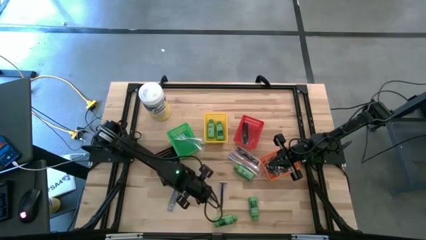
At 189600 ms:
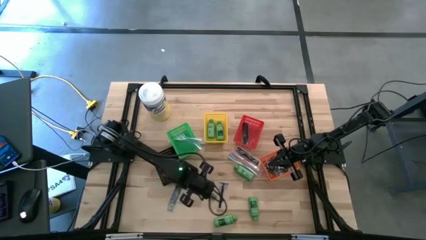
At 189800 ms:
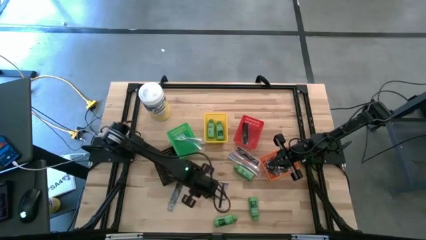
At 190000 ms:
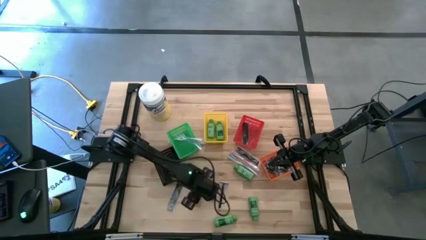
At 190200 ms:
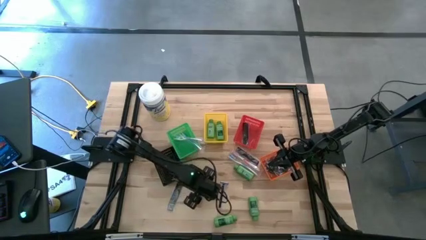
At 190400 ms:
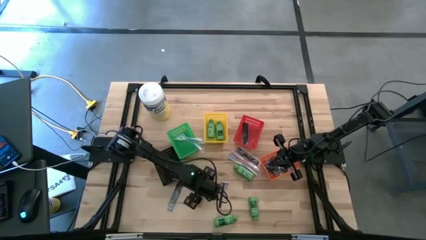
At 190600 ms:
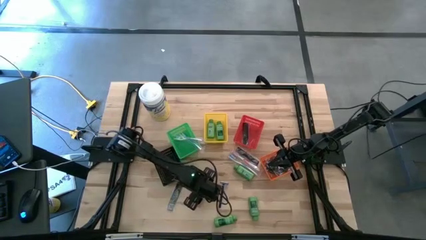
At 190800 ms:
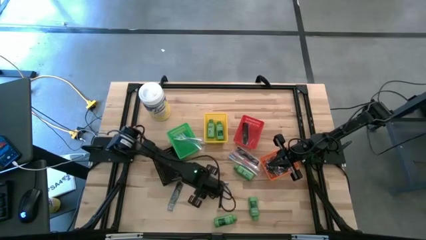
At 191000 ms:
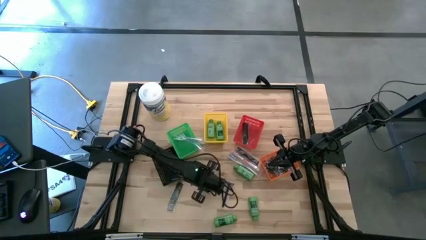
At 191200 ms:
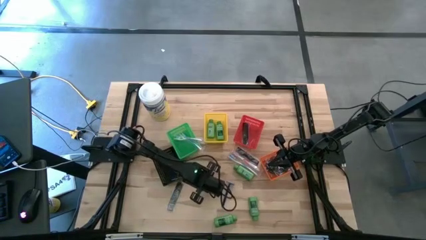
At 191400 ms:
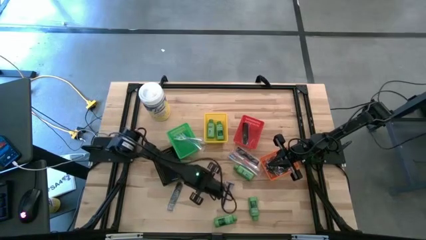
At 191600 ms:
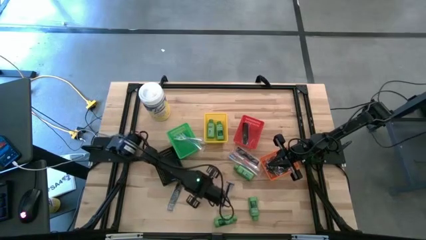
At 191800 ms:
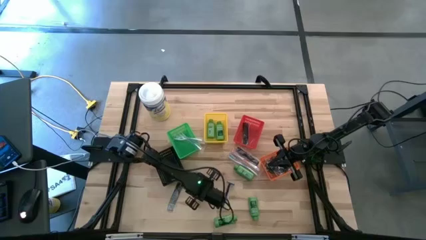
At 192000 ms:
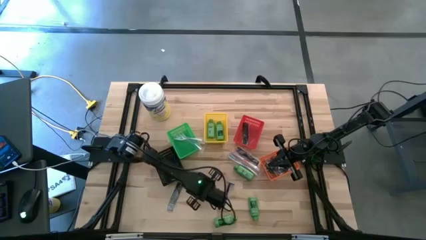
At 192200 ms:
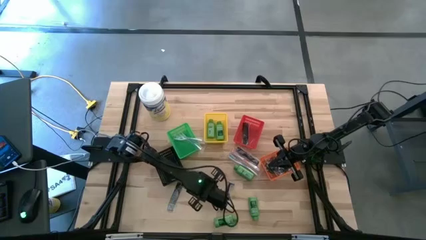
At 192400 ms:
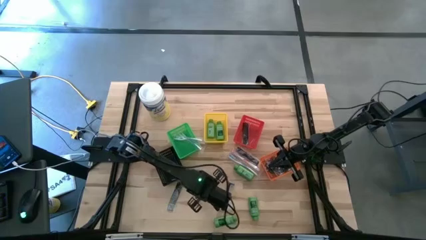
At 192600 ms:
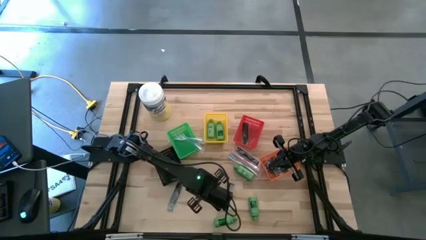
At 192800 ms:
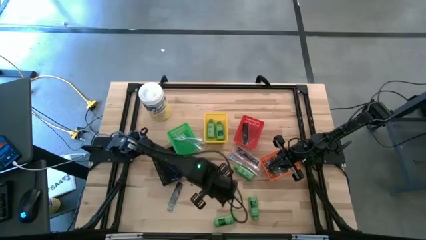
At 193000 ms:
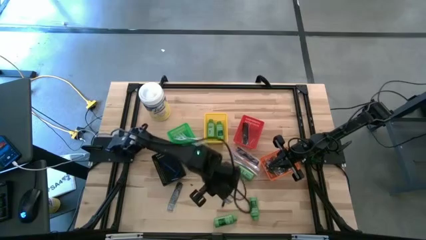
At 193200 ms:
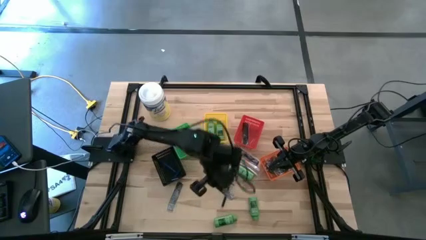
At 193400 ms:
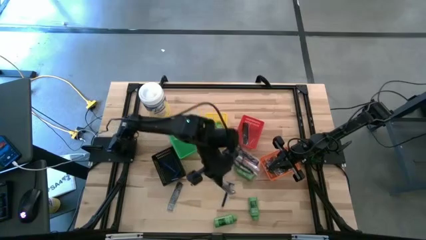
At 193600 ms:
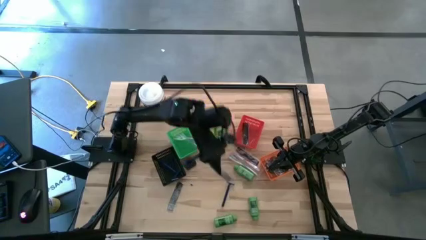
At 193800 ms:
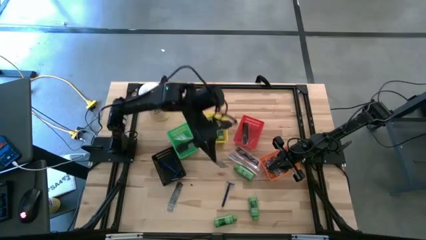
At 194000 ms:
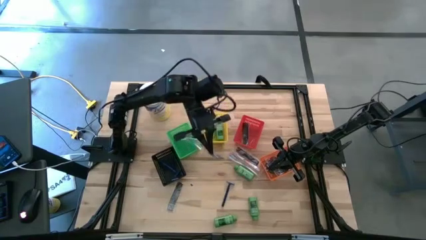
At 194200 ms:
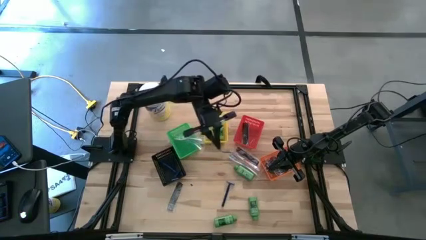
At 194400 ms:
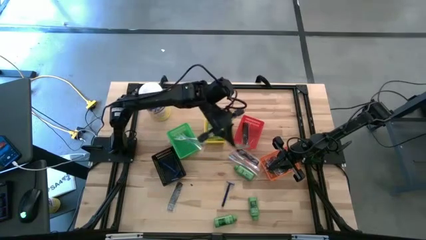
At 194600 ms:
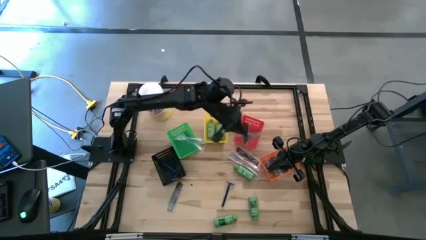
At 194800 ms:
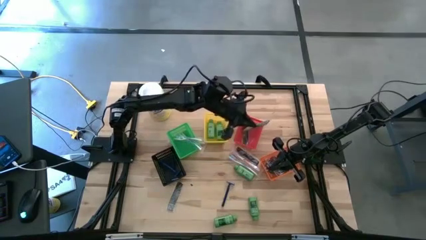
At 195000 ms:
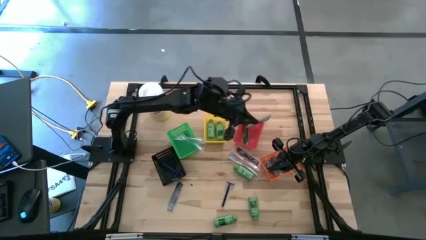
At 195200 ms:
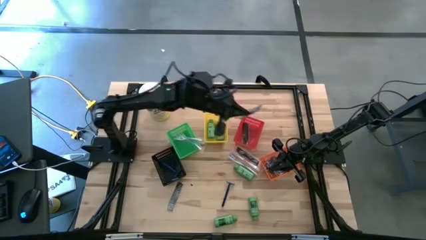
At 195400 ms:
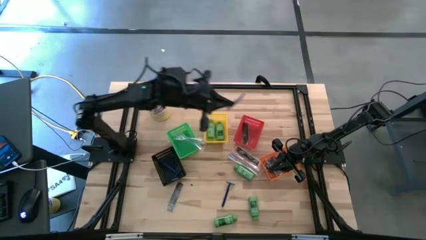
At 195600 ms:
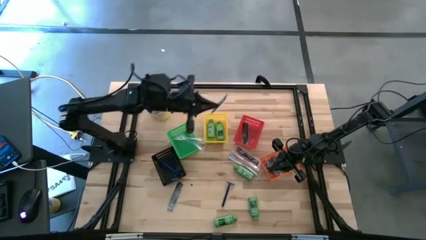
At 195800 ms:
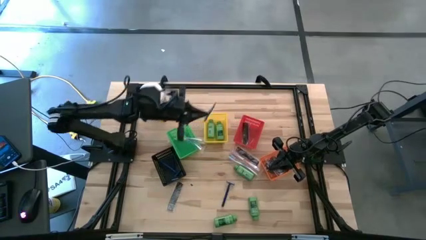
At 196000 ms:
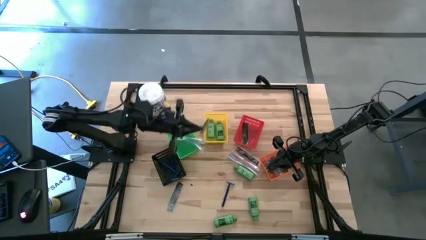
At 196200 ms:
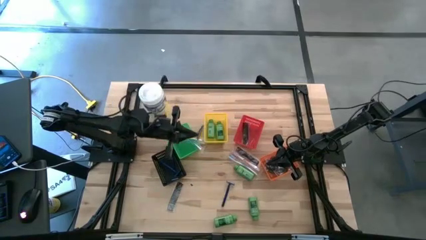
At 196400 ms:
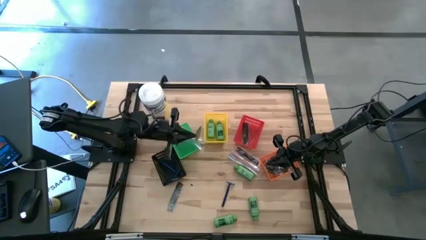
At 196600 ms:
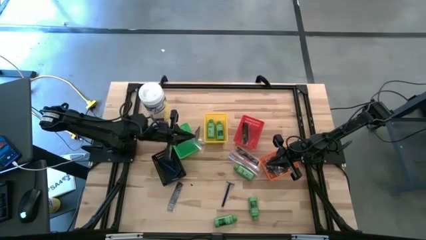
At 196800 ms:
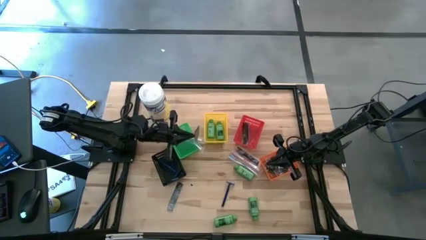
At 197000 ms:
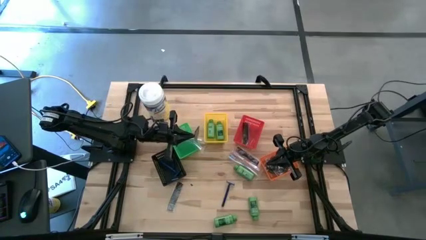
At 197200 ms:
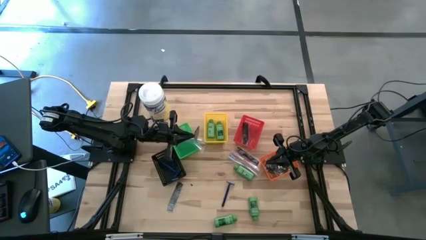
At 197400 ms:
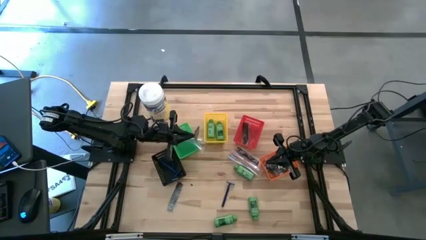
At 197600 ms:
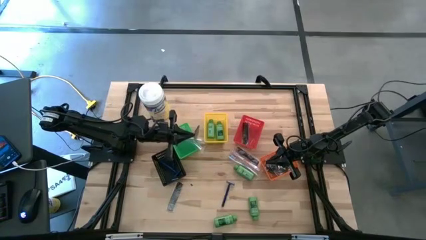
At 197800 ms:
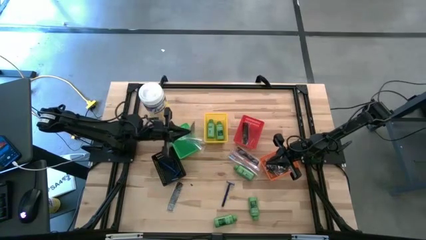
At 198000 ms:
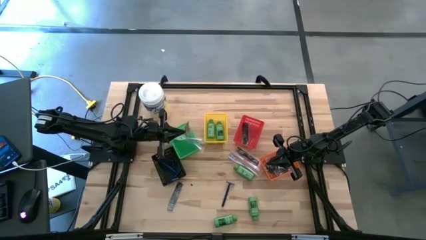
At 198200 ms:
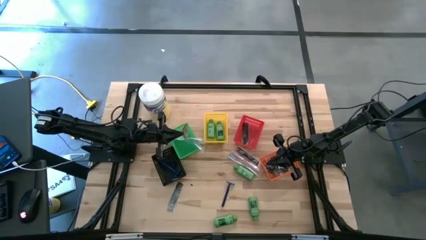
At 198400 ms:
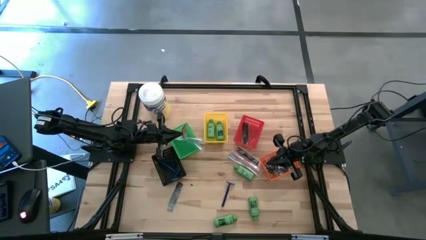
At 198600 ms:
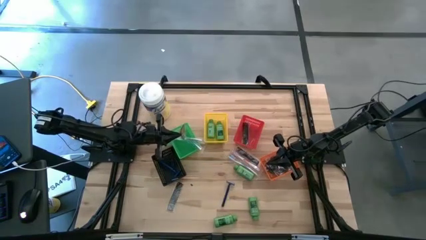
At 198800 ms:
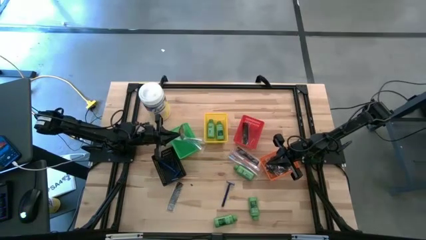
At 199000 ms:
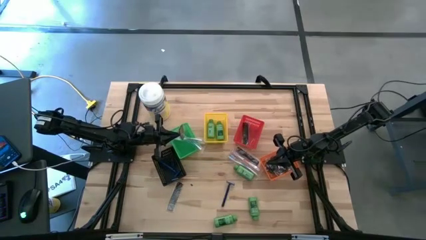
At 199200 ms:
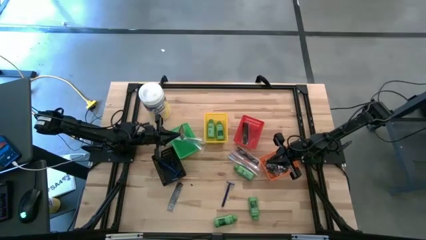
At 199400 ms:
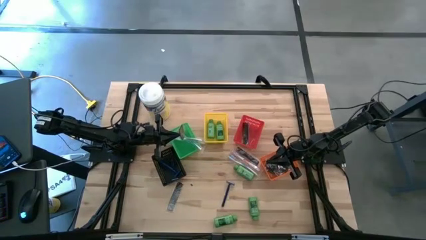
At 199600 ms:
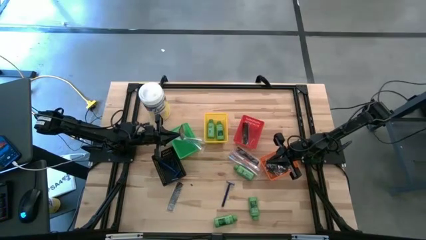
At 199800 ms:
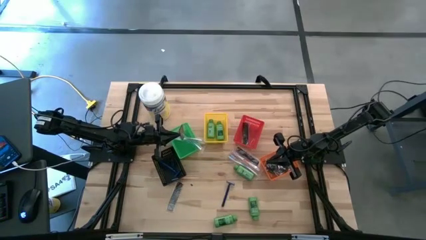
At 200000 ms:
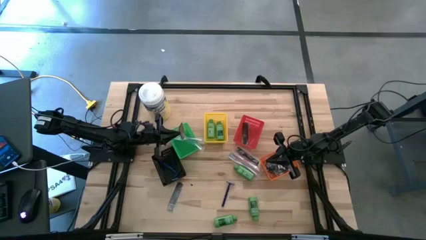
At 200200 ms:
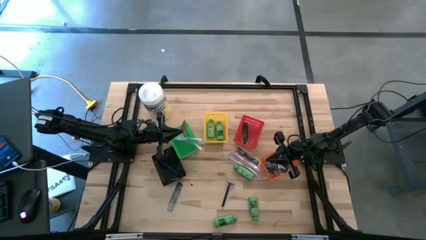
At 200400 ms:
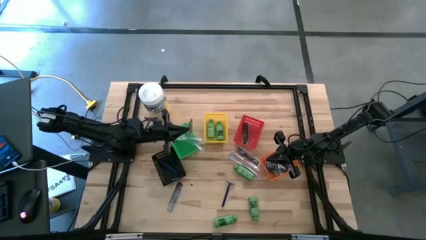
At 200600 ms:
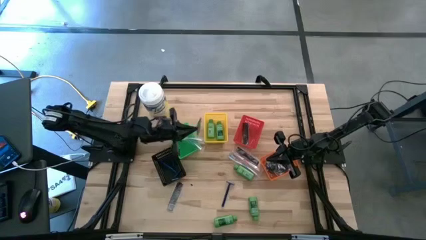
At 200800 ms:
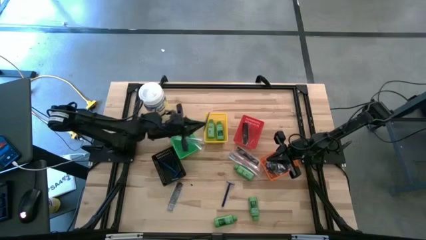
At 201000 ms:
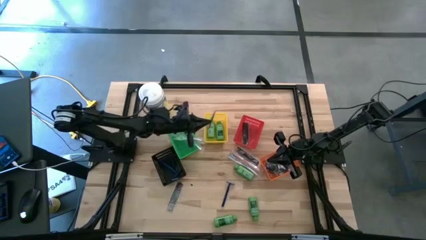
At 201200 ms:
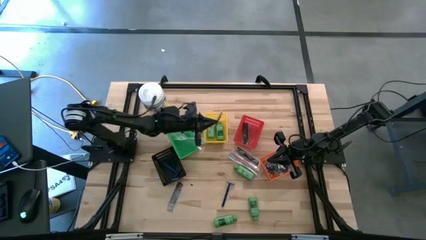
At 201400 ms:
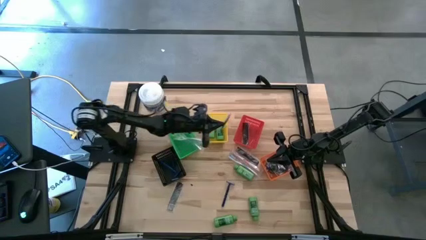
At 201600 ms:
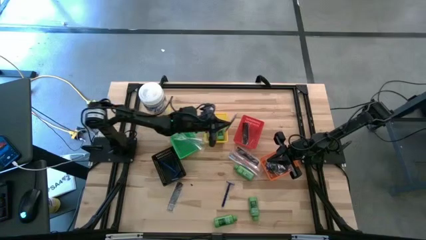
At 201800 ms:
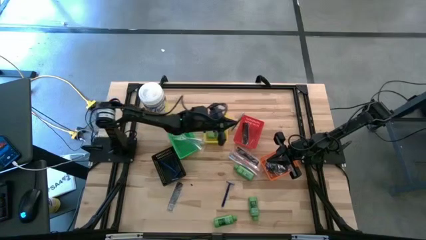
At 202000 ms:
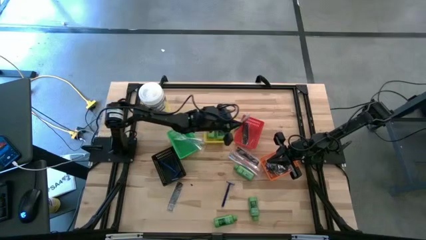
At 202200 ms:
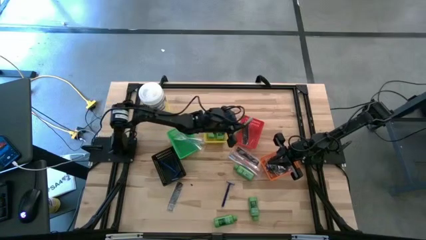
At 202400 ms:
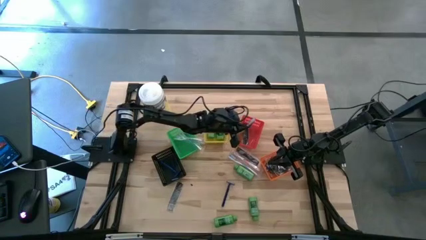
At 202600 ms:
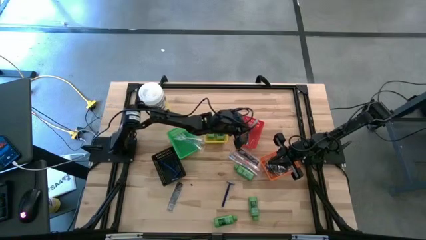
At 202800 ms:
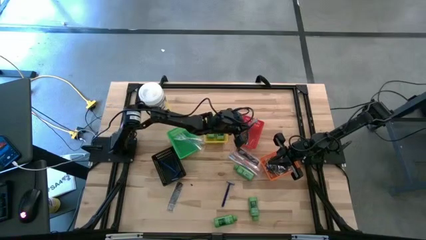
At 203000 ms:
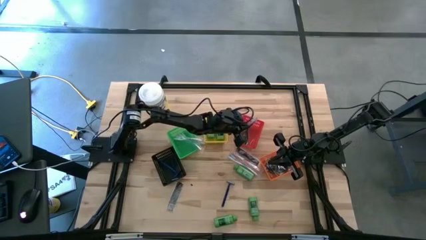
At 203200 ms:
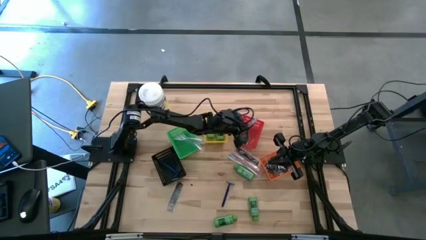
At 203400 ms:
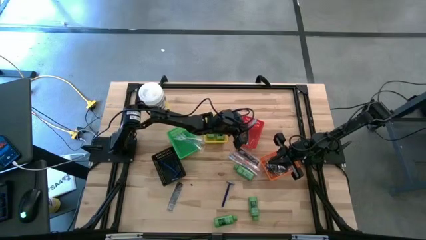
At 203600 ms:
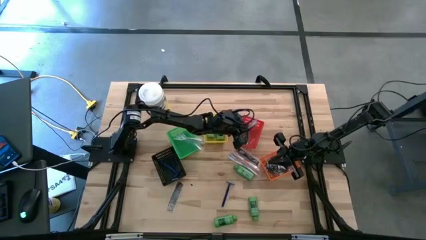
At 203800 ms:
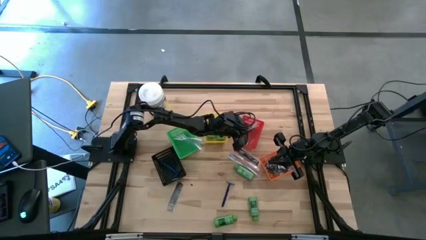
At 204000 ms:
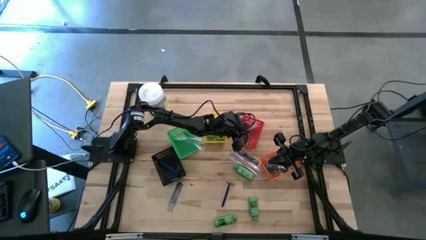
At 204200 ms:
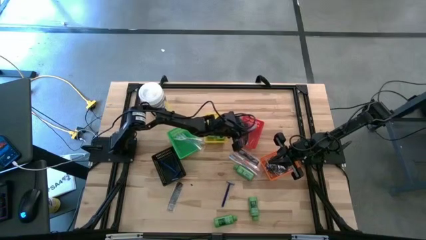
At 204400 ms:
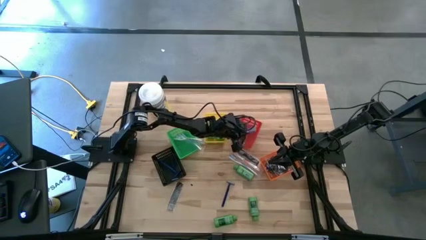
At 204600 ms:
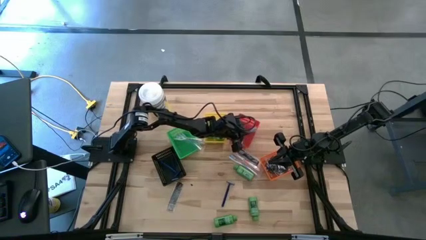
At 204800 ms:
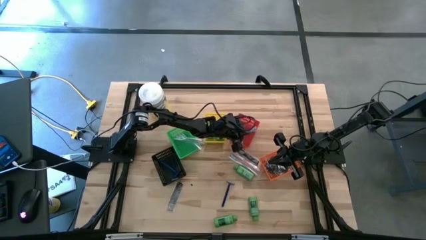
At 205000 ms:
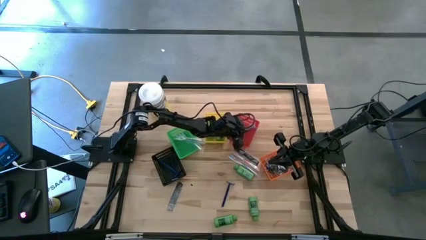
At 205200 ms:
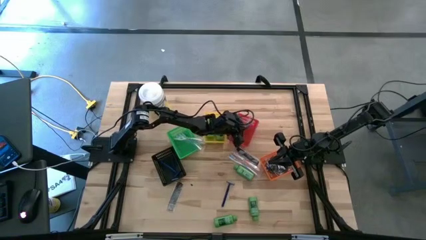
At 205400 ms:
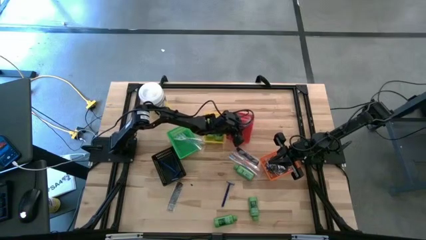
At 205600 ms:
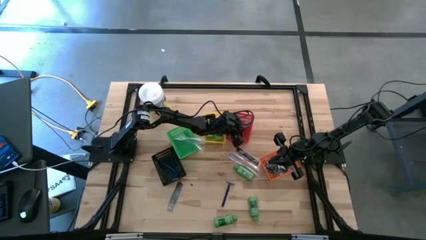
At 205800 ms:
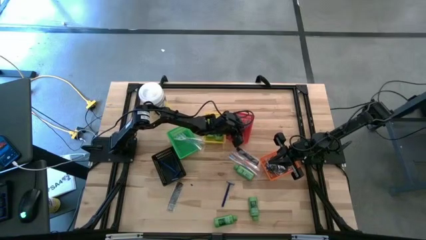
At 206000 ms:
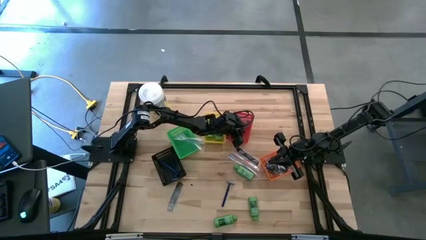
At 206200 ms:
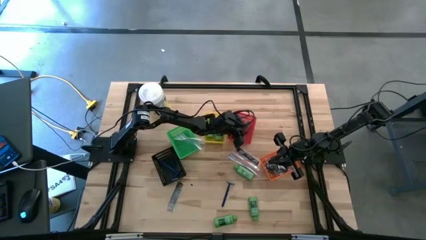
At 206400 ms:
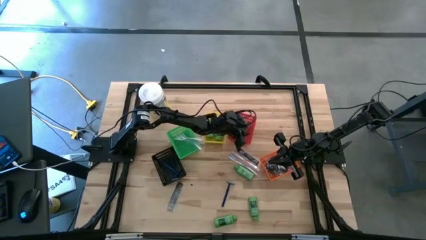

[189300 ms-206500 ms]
Task: Pick & Place Travel size toiletries
Put the black comb into the red bin
